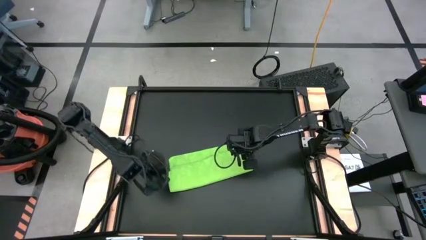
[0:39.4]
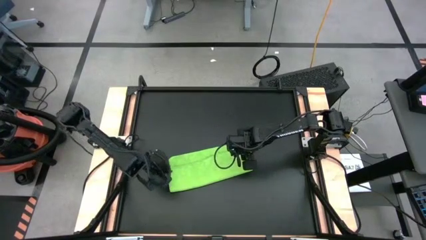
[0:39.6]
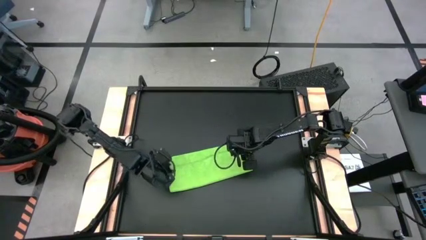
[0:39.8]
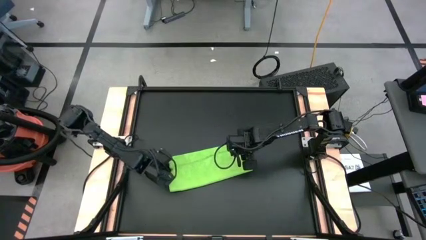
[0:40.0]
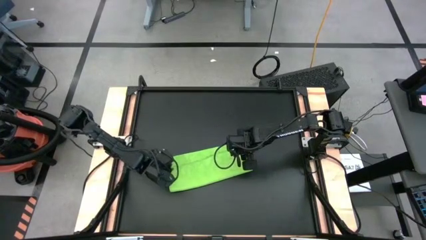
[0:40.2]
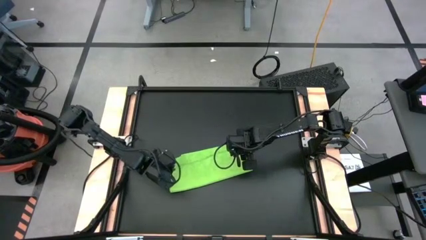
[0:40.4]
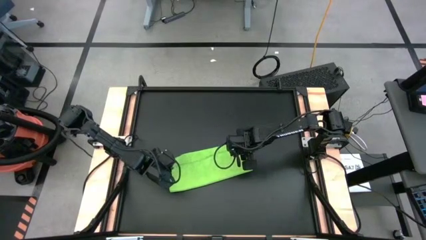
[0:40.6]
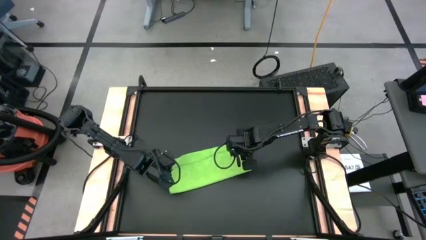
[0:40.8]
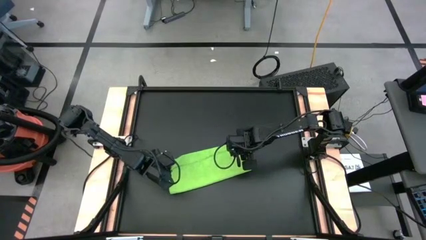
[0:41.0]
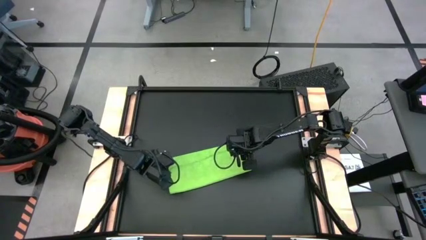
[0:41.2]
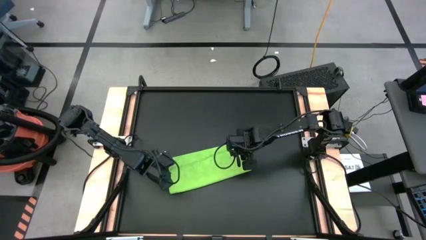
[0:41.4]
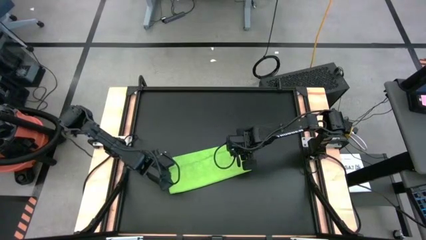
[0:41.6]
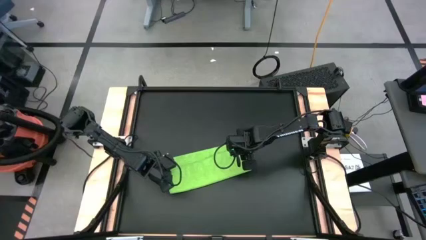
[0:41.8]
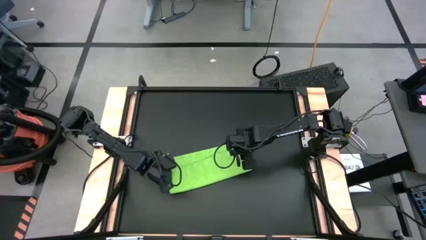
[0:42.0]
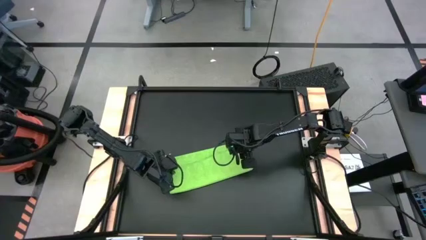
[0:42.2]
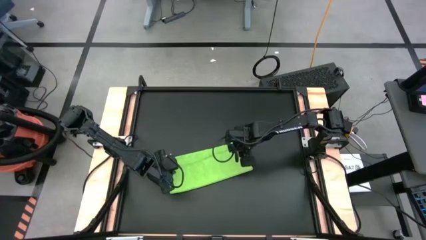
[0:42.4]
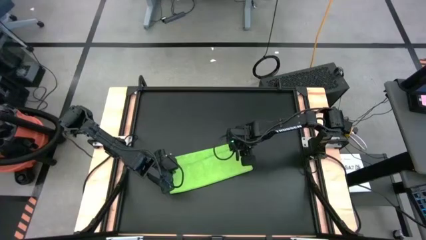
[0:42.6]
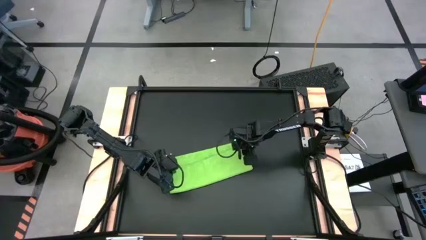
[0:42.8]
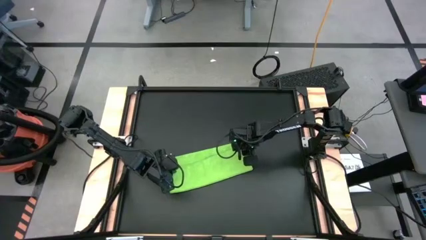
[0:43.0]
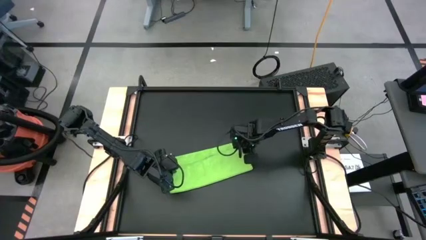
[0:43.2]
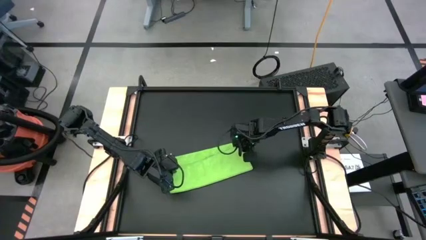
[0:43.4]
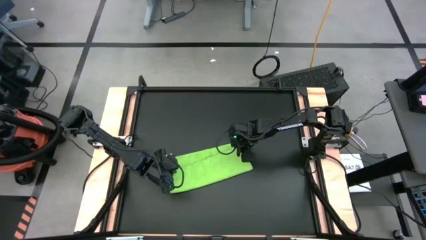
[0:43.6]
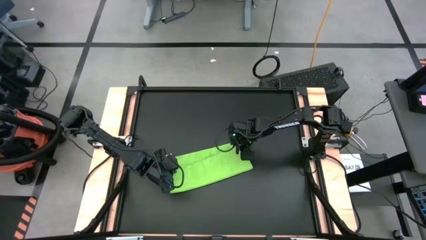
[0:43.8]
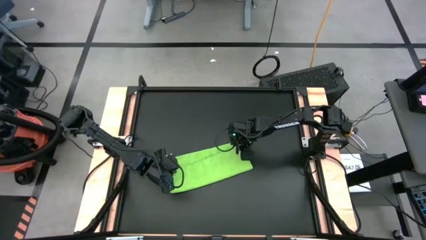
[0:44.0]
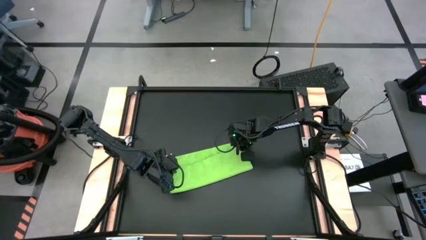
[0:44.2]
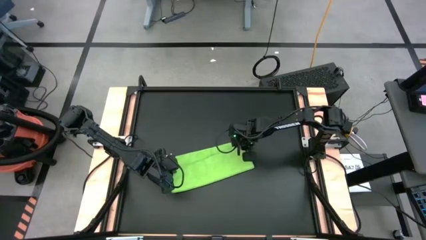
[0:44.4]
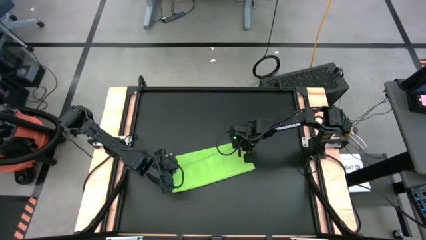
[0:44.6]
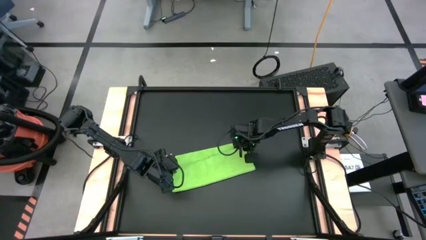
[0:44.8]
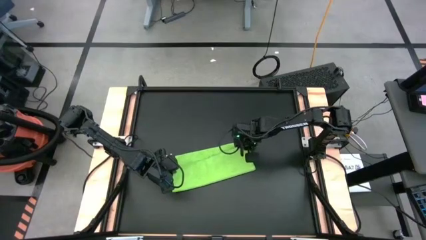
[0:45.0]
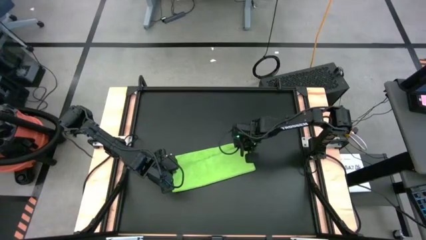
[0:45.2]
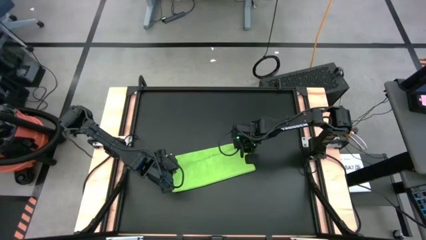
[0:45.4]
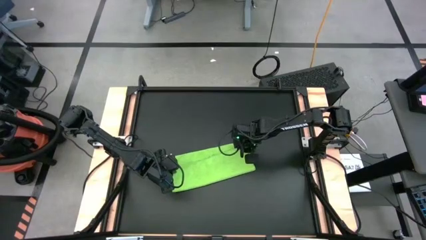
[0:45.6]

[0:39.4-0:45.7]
Task: Roll towel into tight, uniform cylinder
Fold the green towel

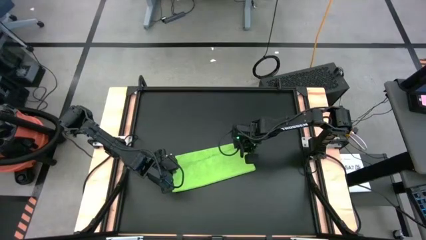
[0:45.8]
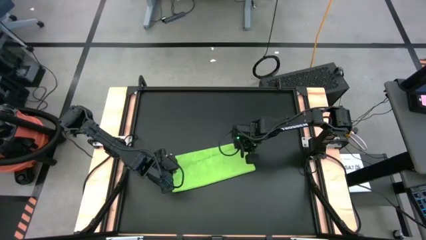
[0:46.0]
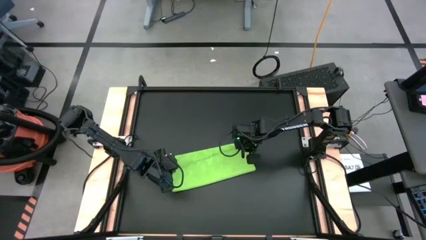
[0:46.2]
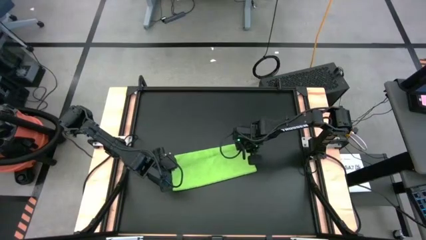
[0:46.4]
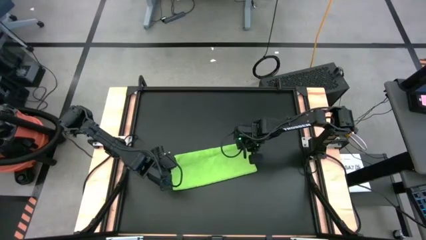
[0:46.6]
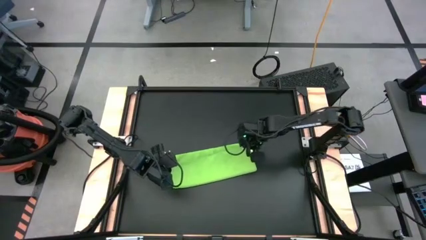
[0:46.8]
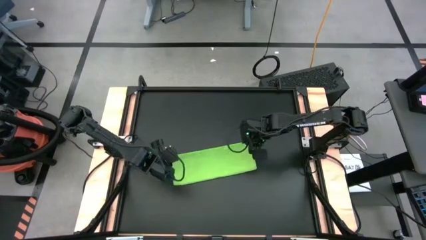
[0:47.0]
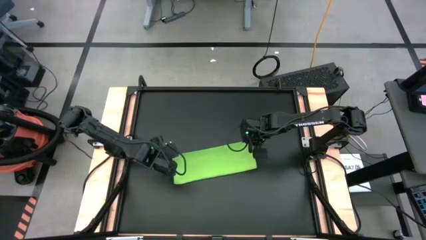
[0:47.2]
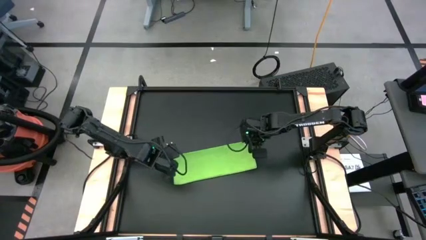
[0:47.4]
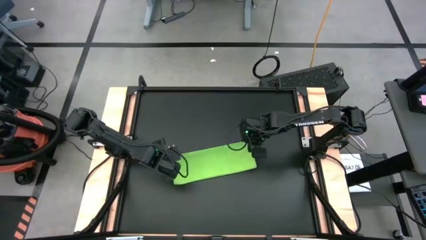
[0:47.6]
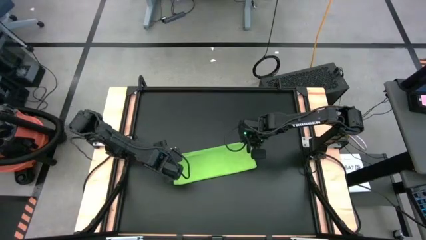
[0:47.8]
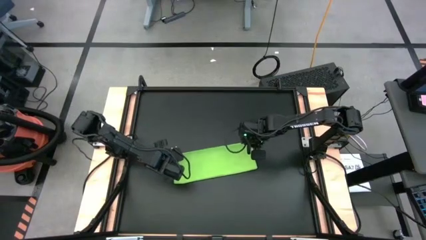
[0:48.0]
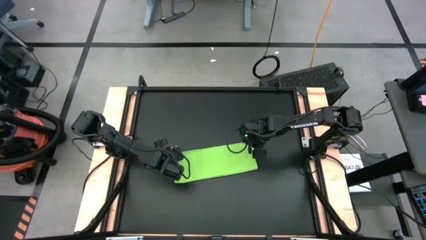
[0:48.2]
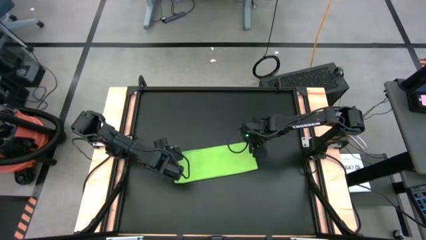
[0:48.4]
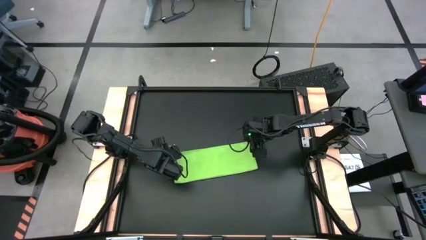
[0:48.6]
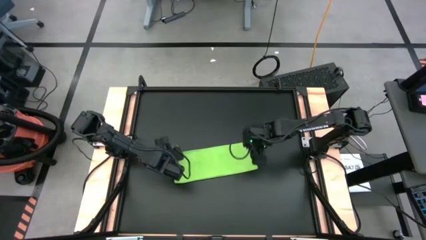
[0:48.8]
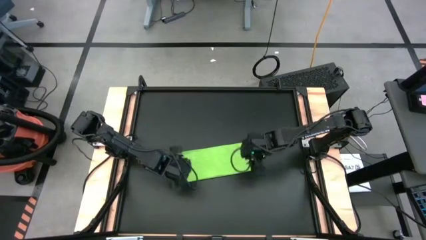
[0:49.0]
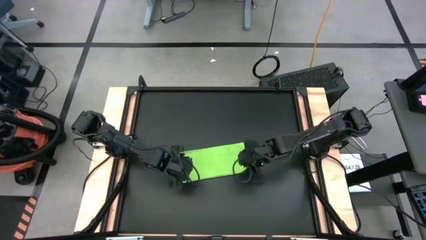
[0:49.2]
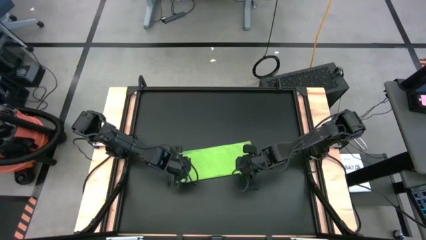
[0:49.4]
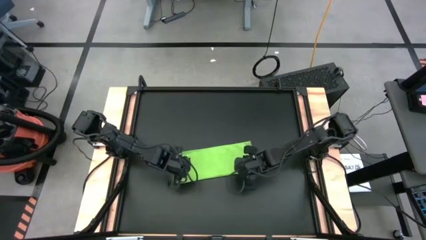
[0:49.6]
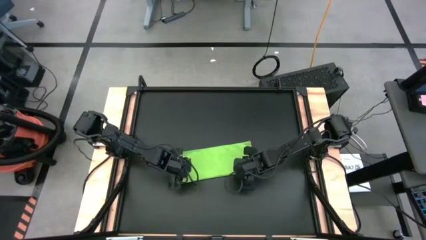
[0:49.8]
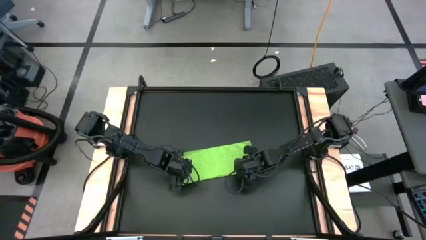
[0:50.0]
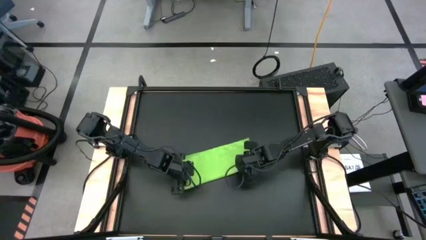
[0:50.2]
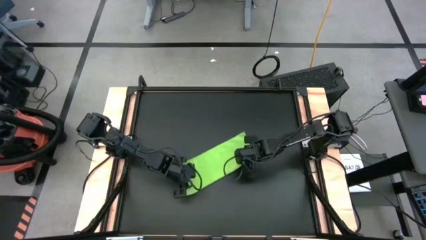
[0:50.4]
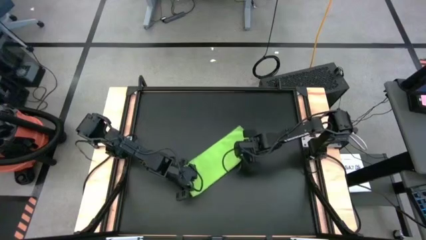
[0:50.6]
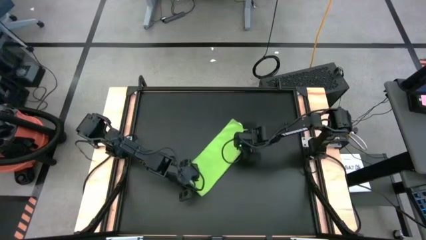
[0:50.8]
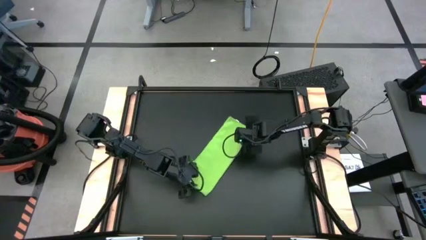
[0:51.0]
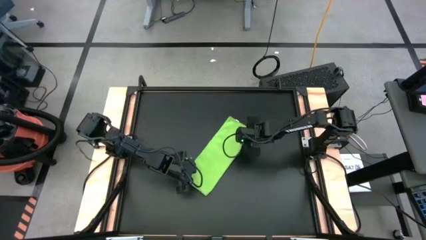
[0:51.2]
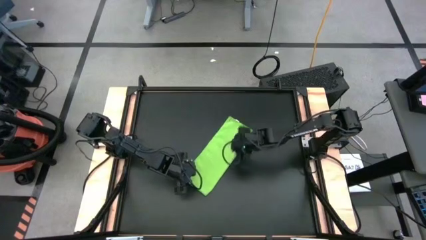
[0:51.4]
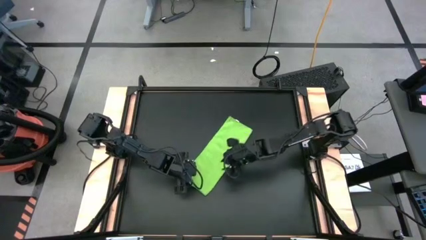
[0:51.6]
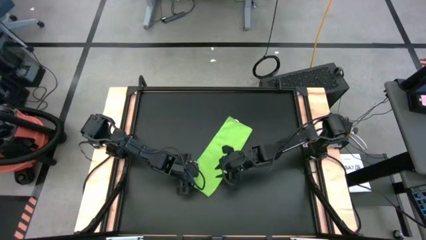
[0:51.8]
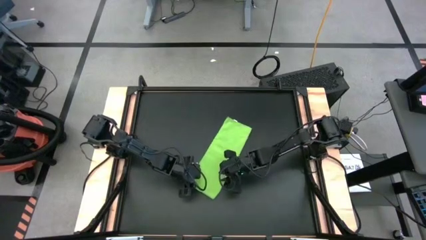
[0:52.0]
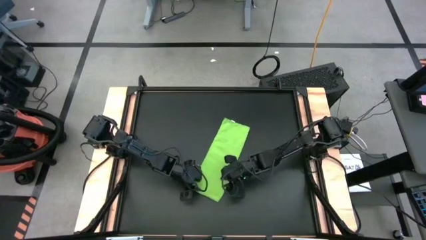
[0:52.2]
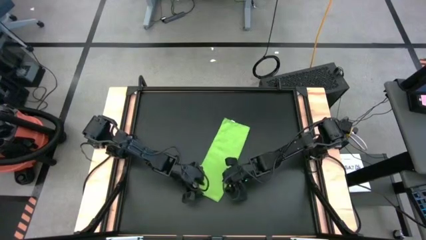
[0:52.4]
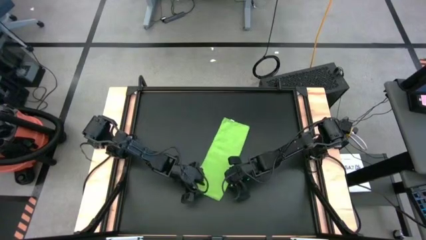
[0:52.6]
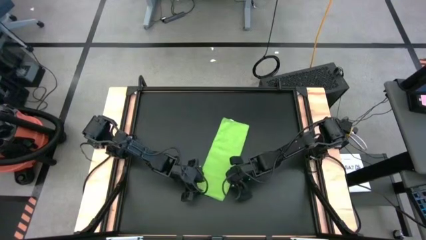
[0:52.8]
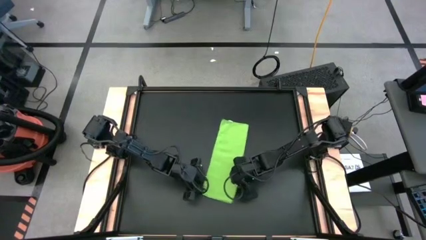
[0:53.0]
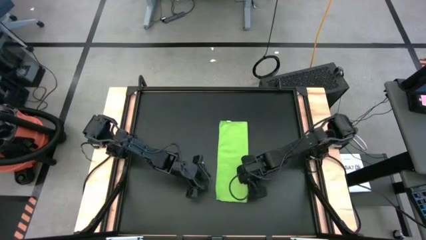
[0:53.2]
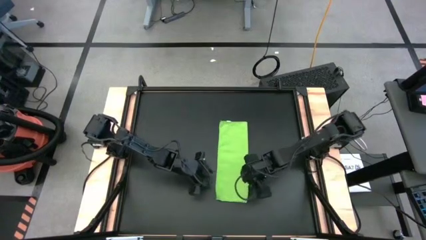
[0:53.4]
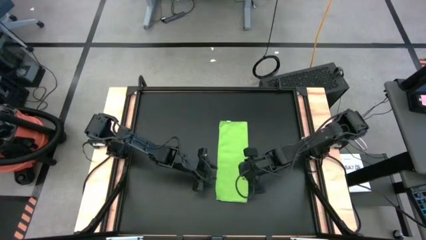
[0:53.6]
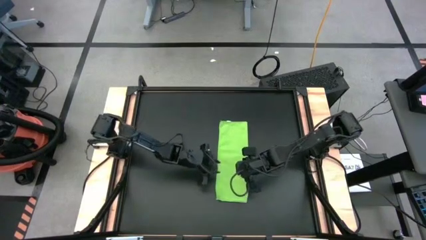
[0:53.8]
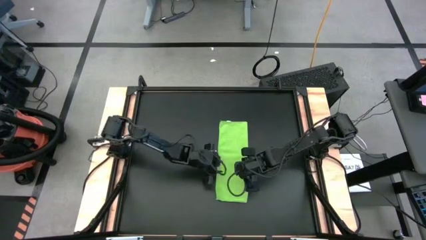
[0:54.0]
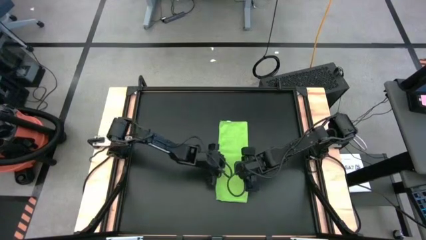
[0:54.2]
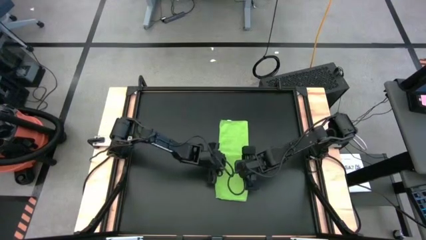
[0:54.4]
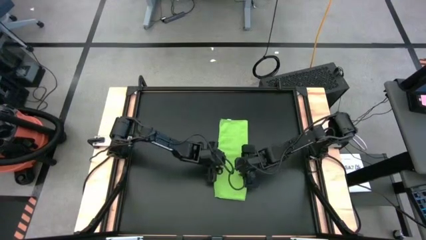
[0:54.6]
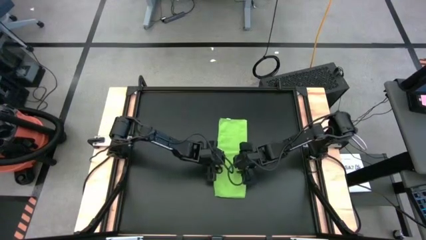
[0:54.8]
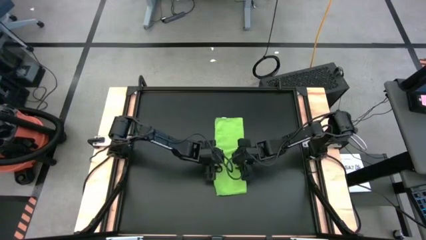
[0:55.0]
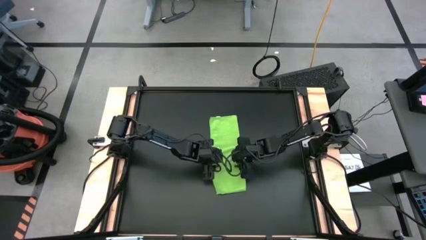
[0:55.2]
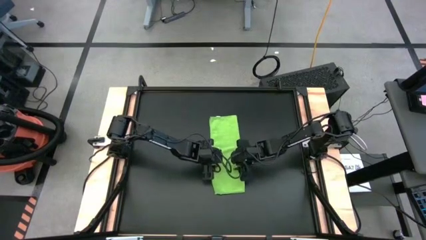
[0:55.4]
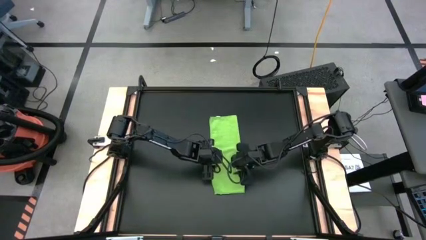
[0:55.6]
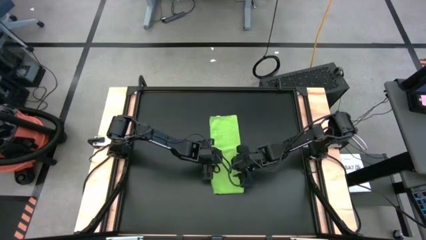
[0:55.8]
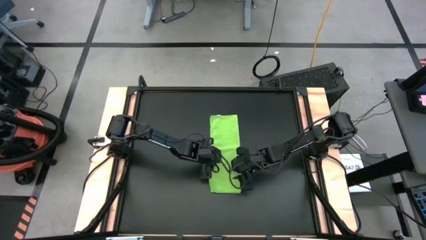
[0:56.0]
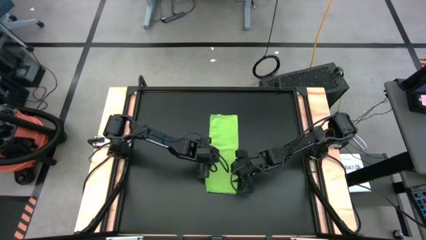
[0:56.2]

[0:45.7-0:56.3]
Fold the green towel
